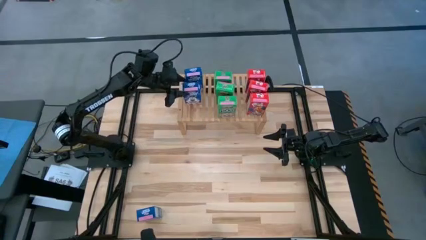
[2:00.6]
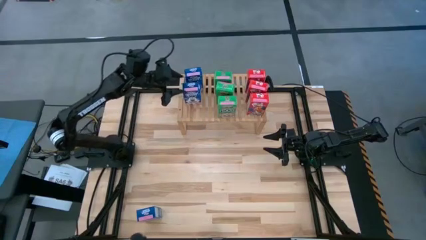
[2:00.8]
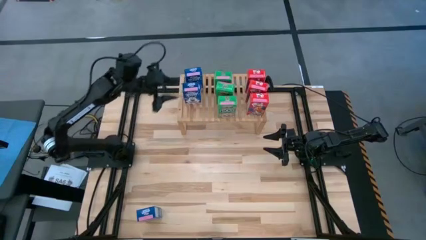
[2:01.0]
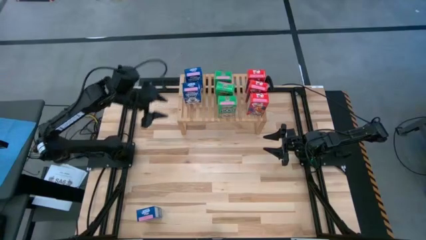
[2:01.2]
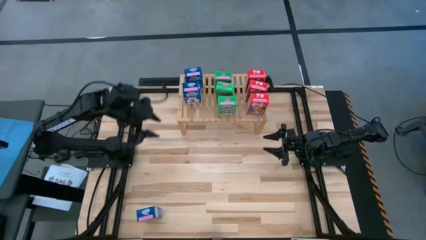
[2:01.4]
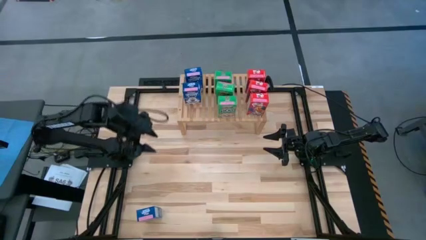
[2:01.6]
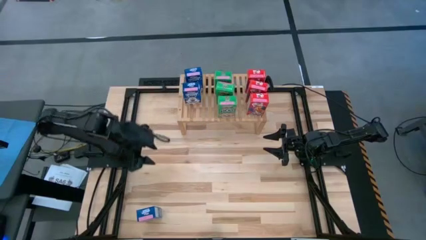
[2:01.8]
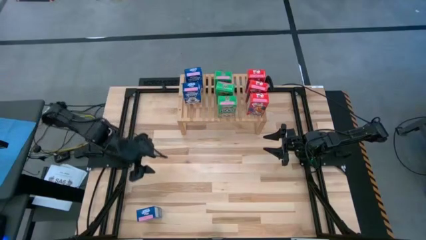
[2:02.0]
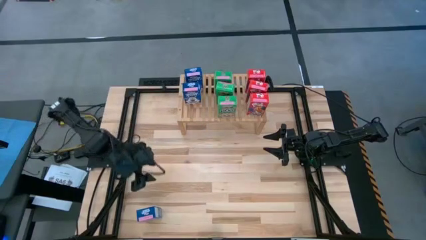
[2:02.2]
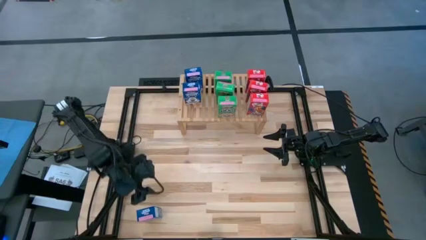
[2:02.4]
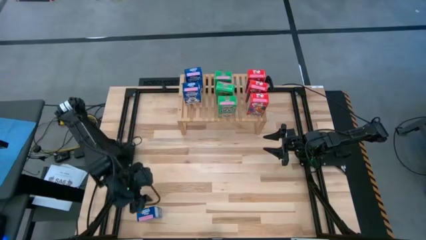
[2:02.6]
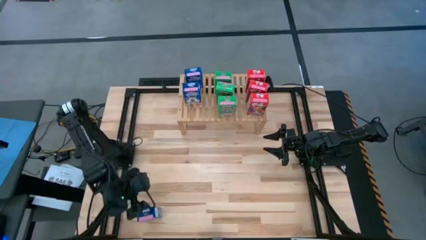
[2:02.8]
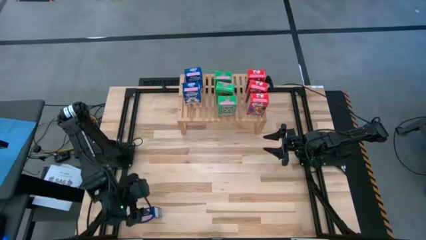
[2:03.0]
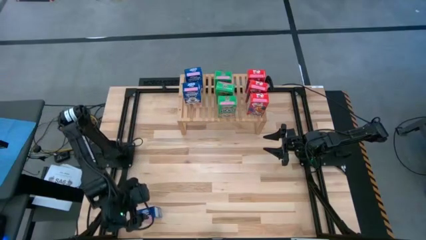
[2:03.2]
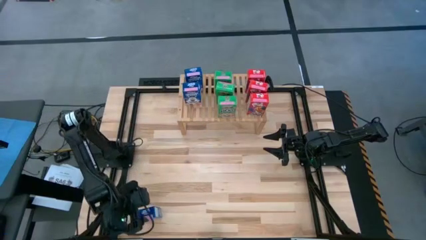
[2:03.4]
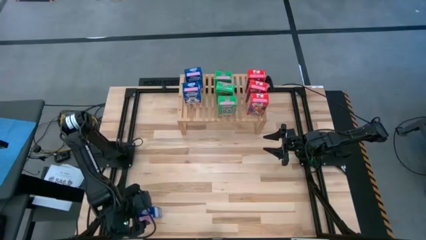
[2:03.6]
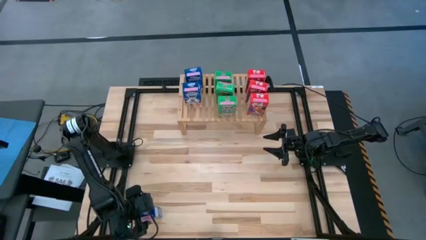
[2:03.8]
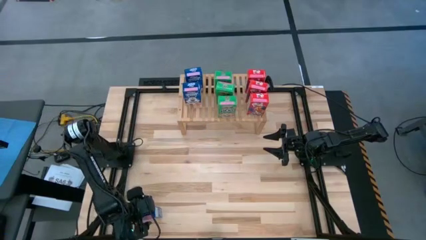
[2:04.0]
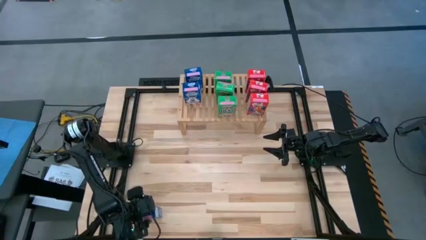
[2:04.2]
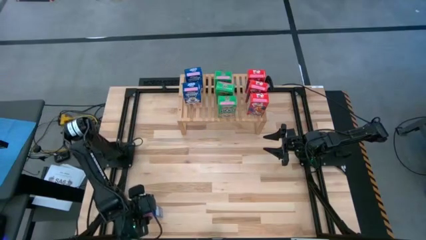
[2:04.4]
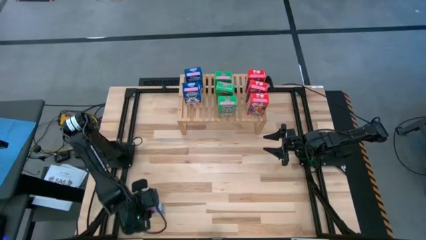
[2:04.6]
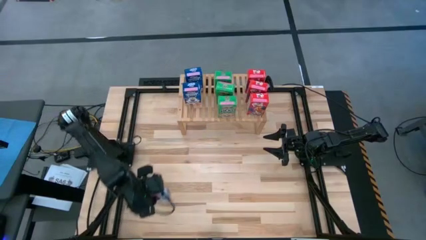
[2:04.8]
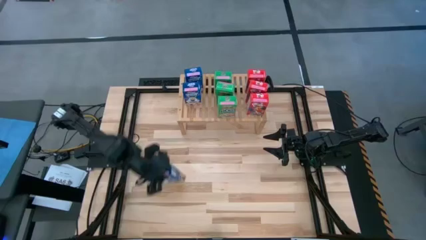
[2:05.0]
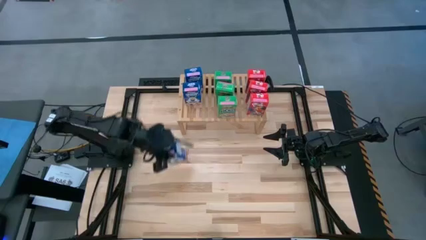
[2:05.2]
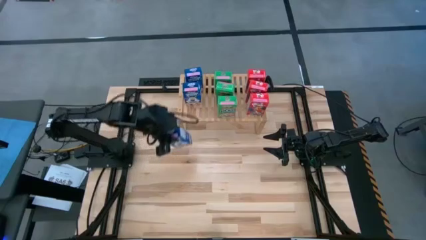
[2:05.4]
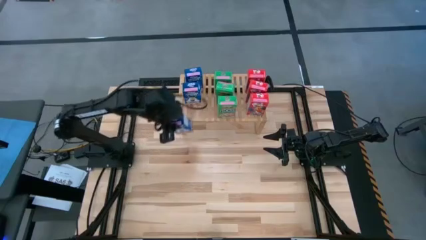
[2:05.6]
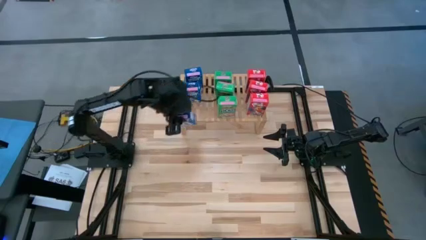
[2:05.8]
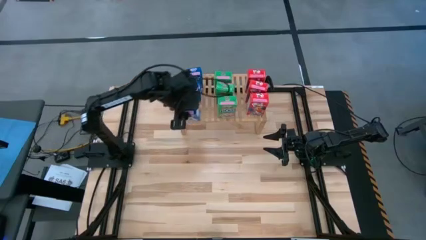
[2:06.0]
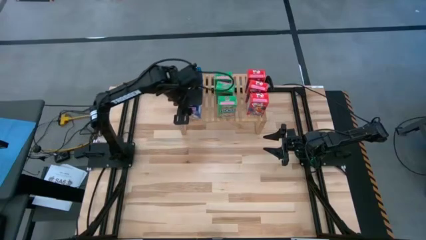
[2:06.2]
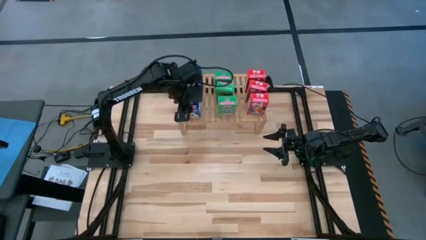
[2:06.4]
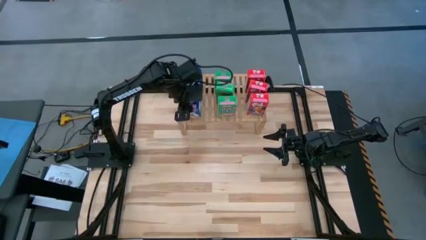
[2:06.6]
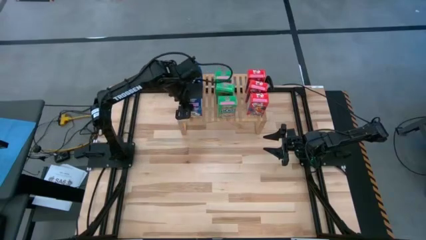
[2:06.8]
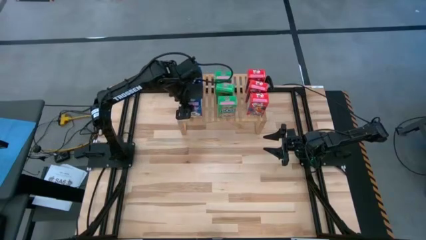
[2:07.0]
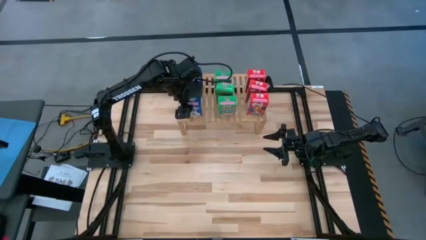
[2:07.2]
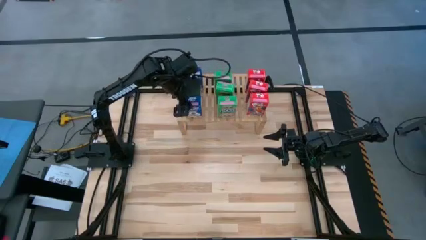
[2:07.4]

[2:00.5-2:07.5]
Task: Stack cereal on shelf
Put the blue cereal box on the shelf aligned with the other blue cereal box

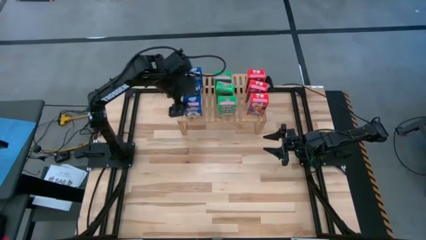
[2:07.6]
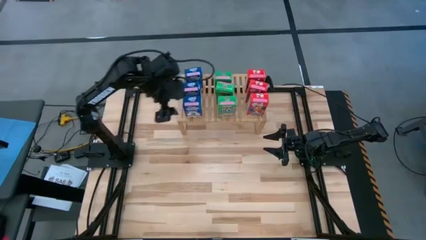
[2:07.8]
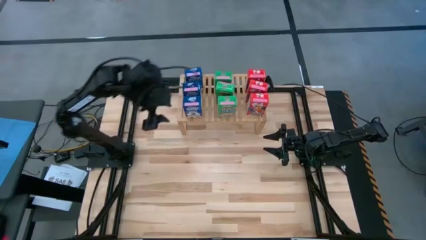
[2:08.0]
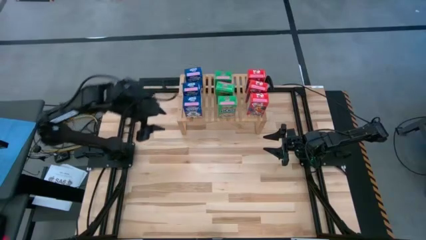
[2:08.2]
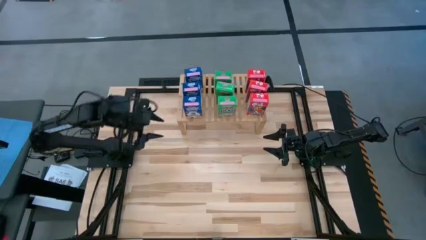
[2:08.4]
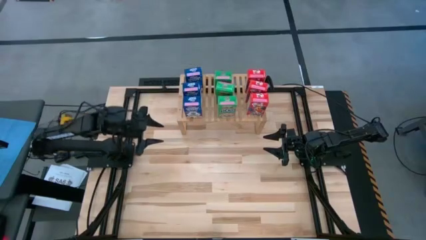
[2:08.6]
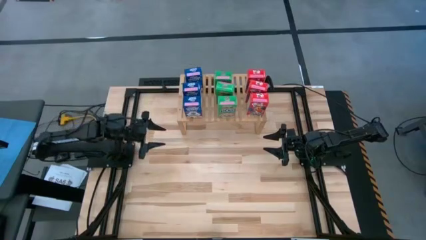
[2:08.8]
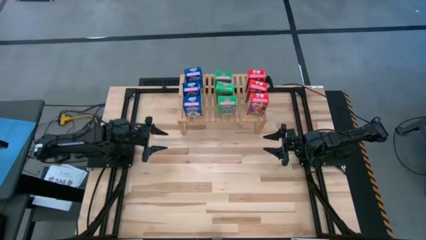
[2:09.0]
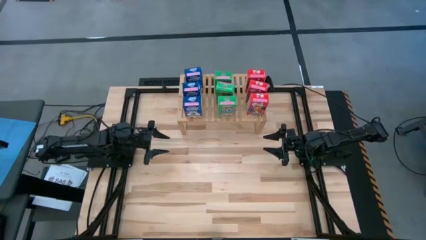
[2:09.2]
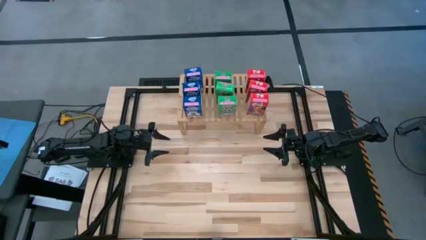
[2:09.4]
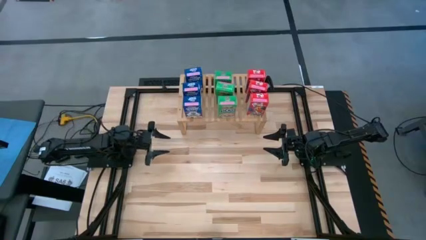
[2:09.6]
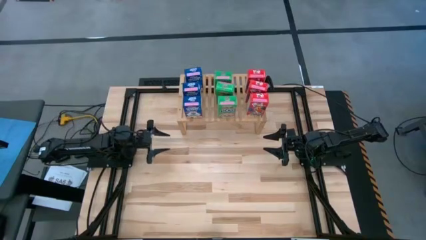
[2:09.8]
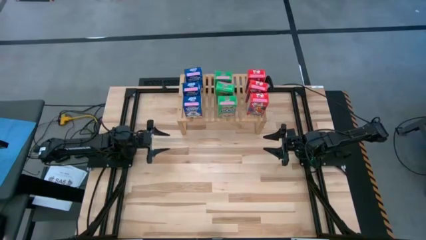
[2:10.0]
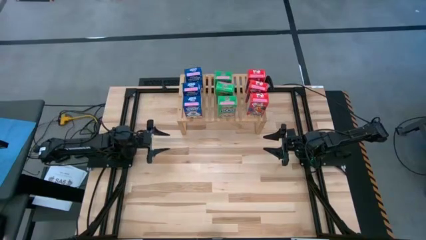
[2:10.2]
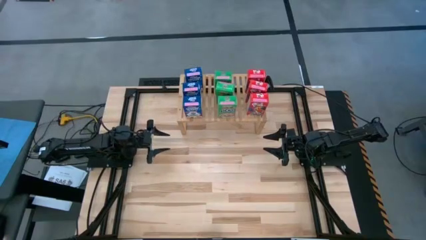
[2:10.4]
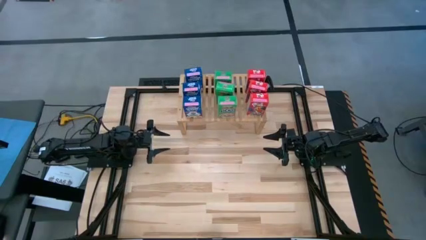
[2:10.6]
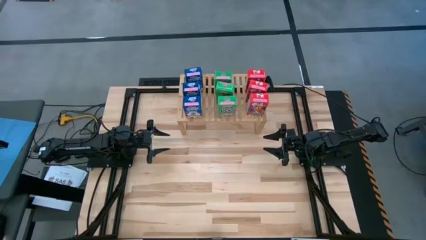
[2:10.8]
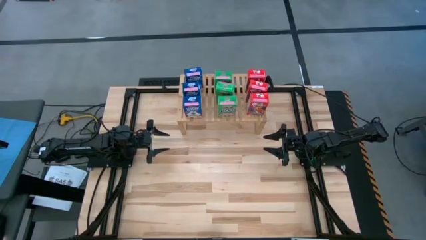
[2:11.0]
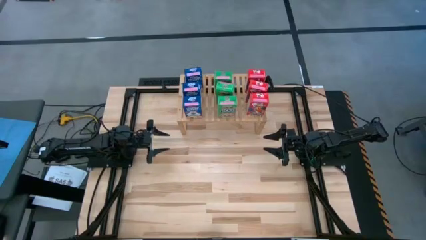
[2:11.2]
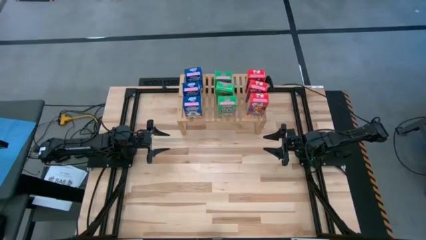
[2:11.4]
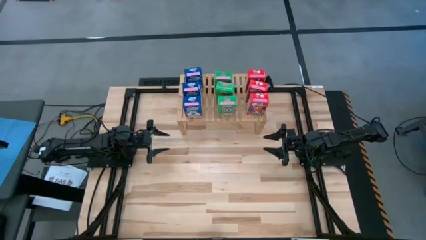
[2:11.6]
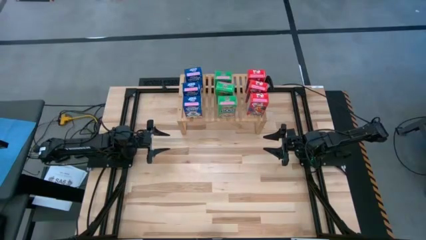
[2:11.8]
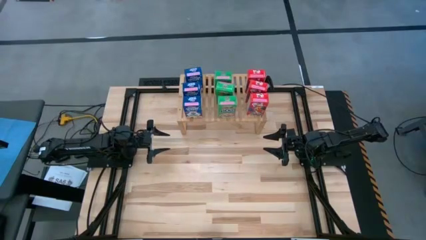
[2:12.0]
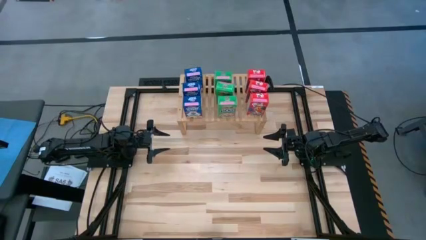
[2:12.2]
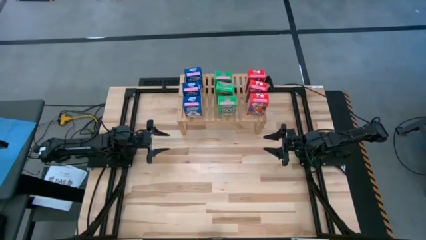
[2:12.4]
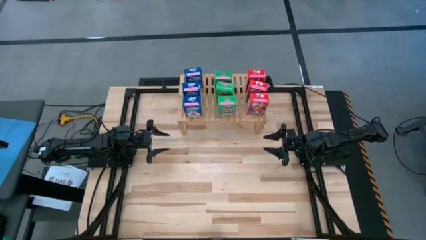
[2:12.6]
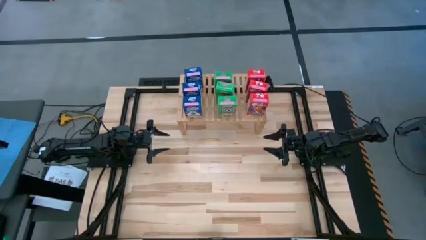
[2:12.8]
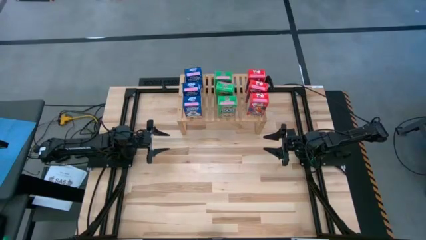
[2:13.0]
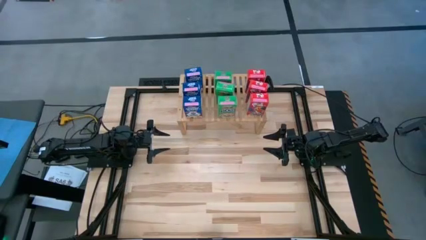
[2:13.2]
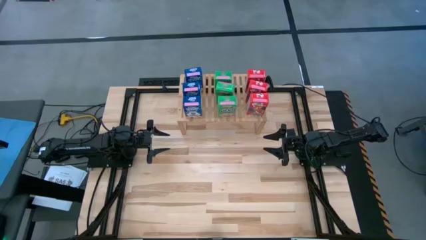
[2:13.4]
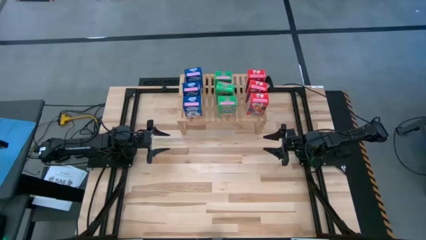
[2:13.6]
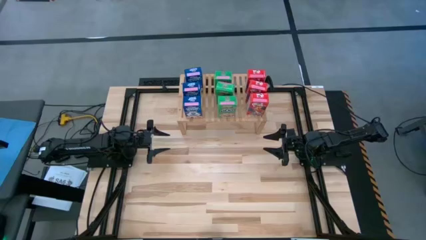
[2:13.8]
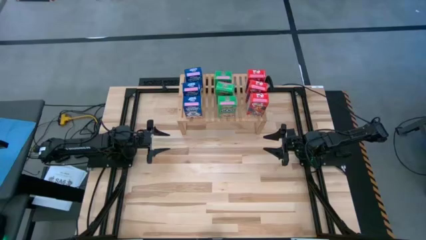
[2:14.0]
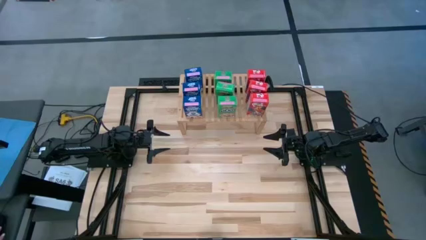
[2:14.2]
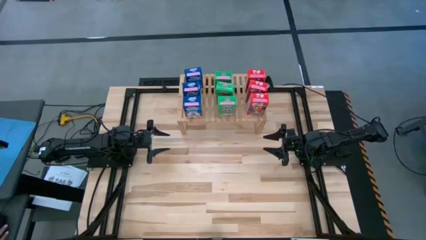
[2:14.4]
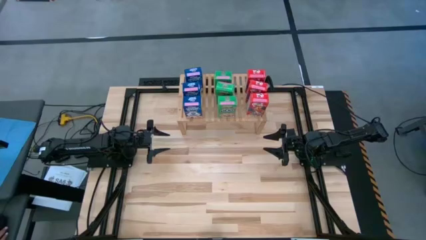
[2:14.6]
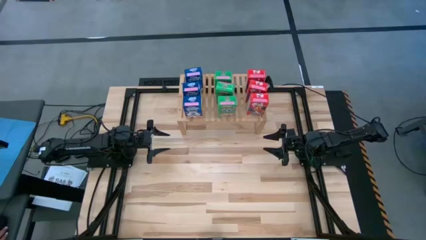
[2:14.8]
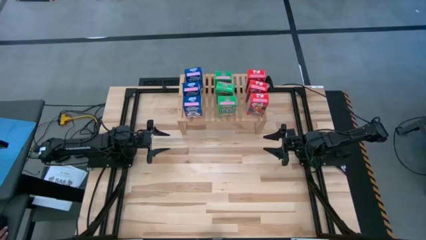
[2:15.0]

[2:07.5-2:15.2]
Return to Home Position

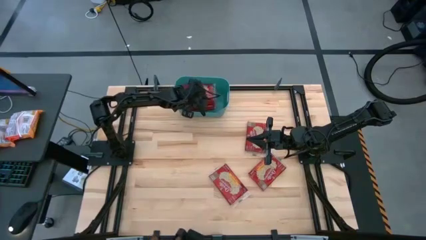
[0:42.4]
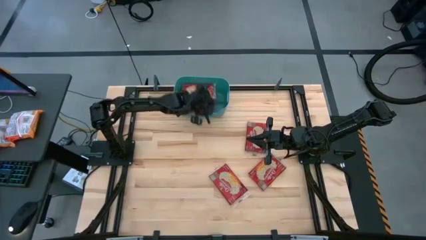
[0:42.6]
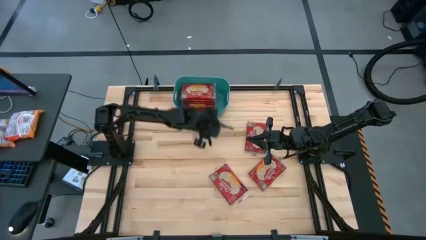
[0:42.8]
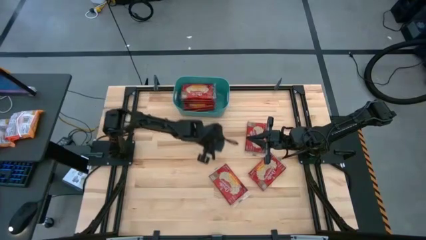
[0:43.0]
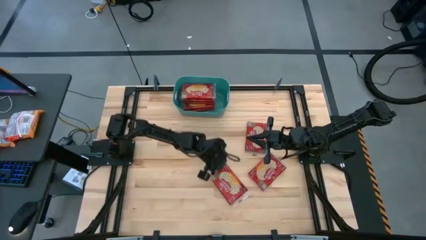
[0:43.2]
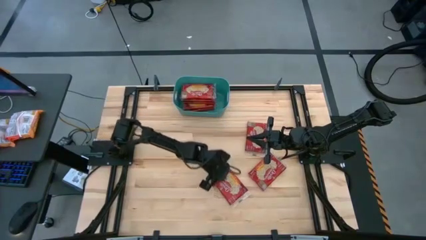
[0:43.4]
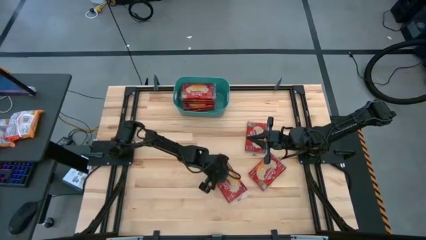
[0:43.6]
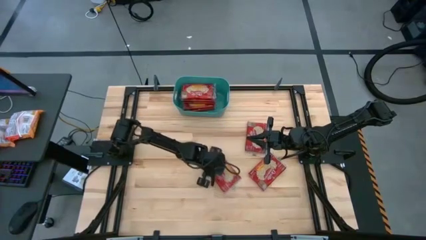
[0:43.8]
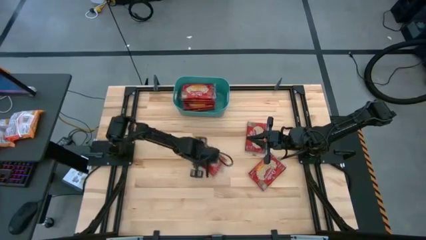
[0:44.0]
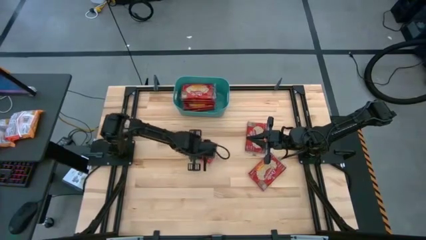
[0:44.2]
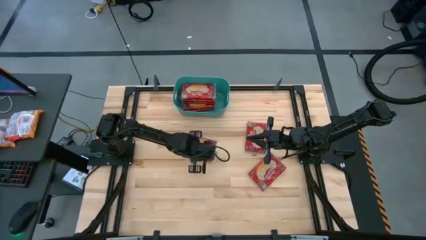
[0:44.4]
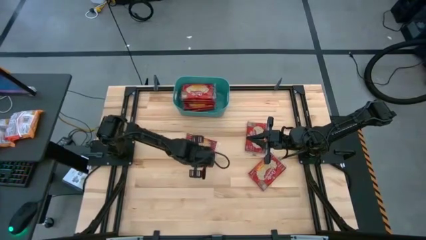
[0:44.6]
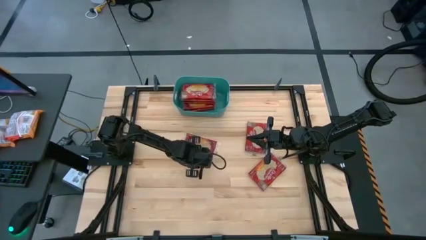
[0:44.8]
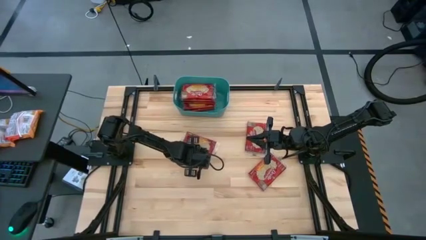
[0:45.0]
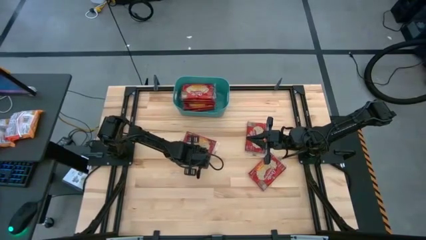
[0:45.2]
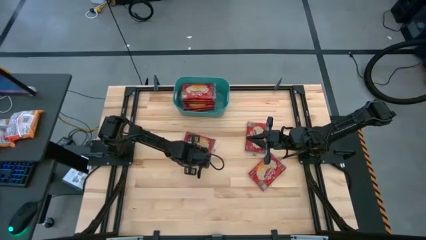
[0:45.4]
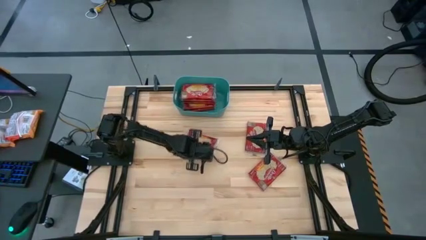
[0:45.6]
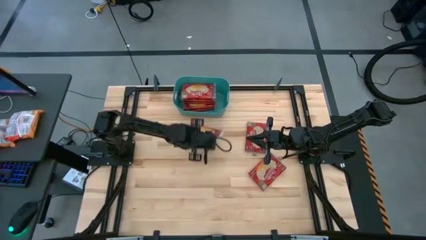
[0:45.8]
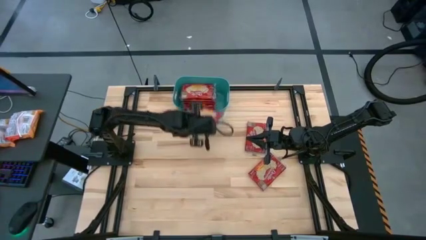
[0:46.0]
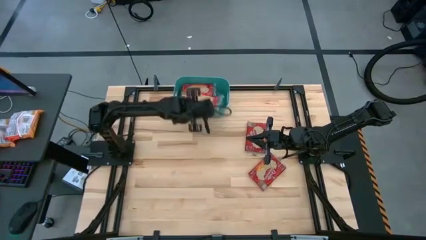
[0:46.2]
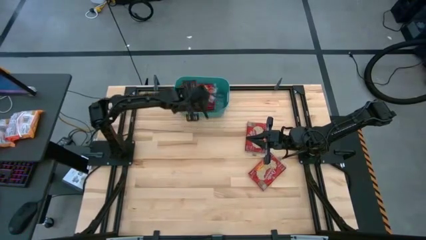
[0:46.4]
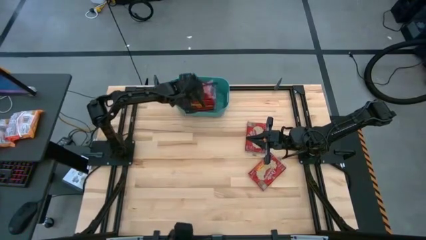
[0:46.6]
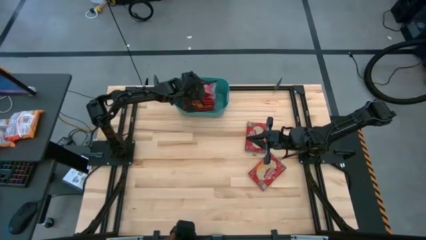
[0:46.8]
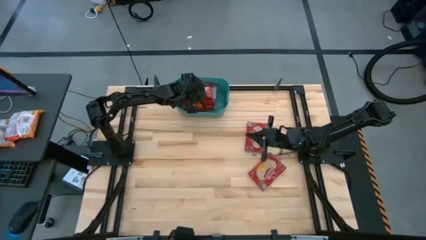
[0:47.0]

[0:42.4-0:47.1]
Task: Sort popcorn bags into baskets
Put the popcorn bag into the green bin
